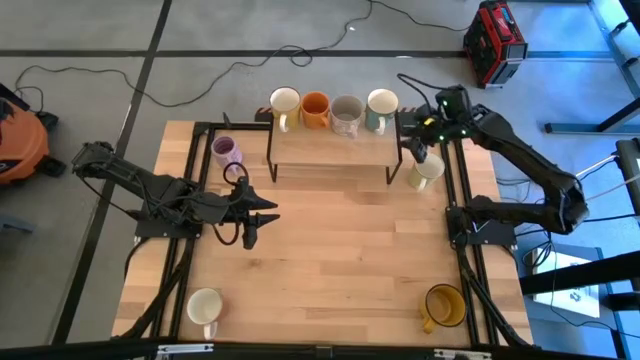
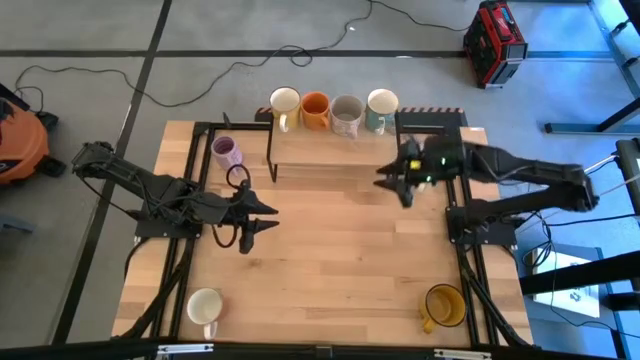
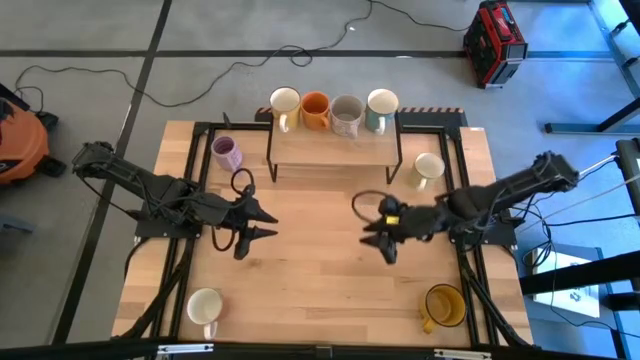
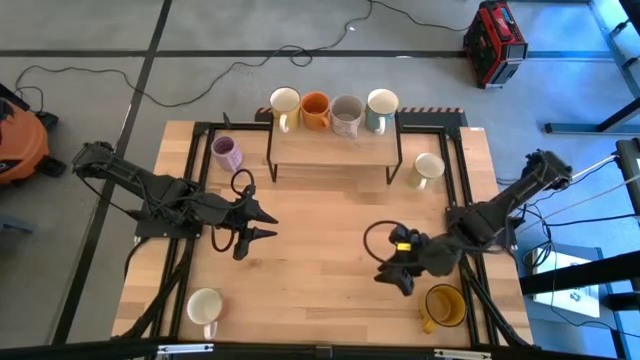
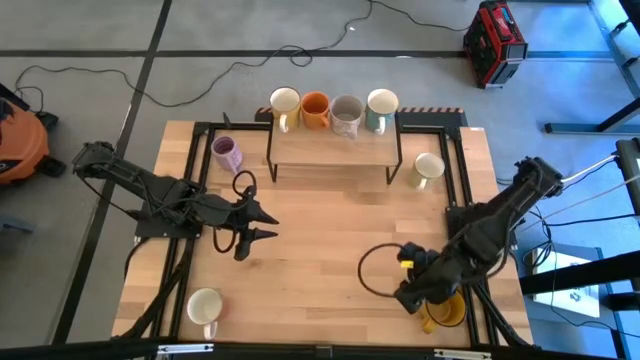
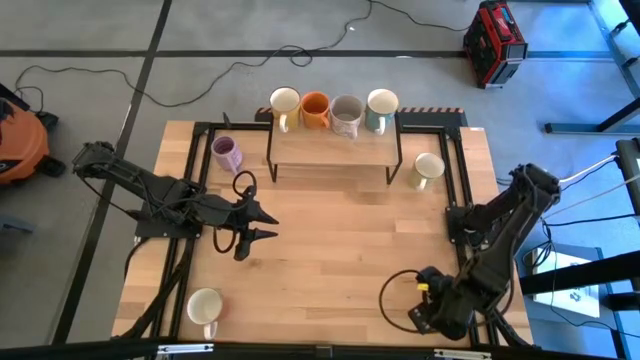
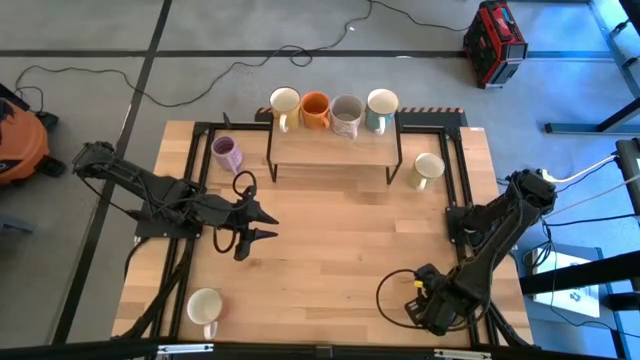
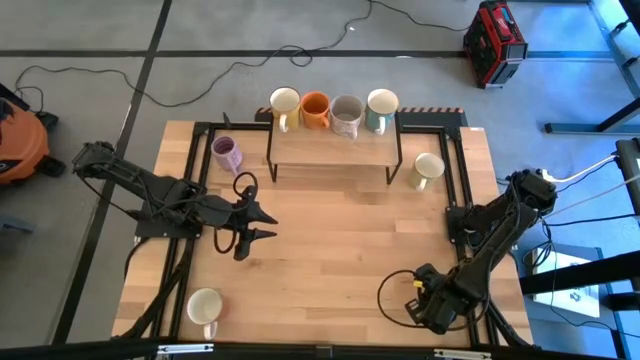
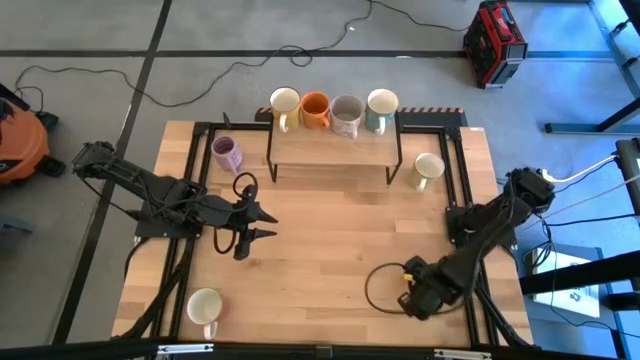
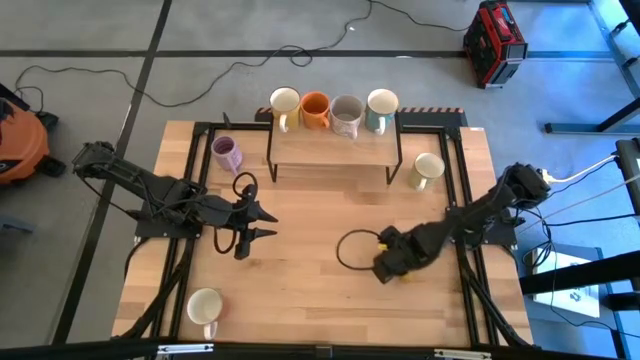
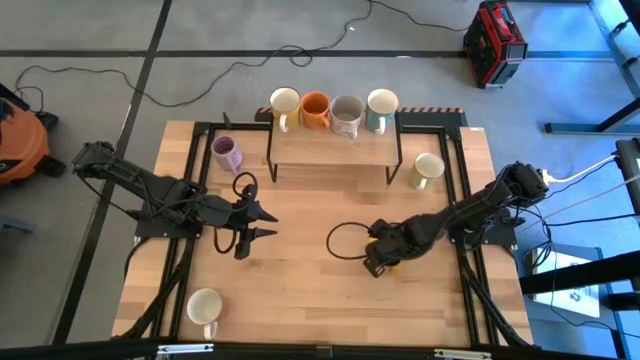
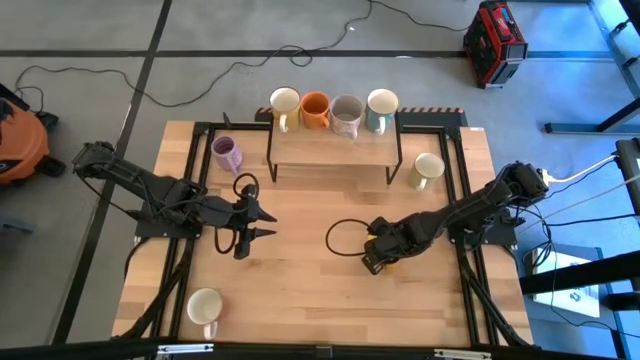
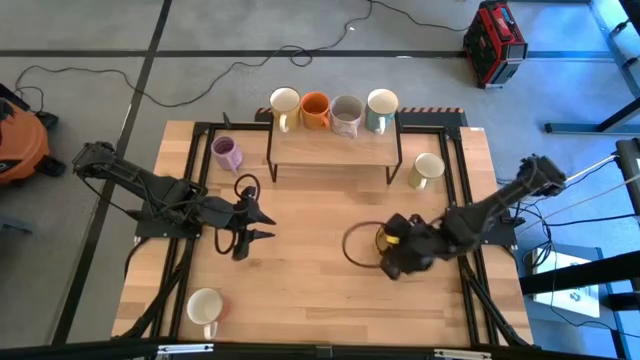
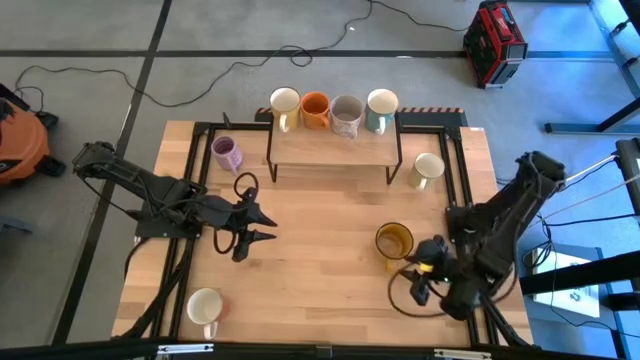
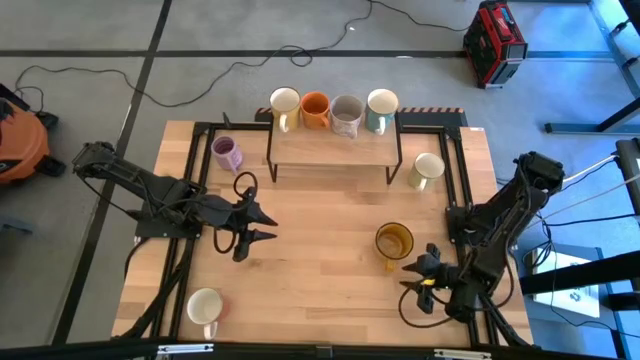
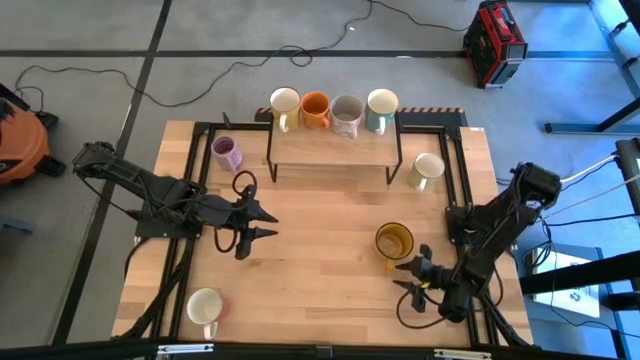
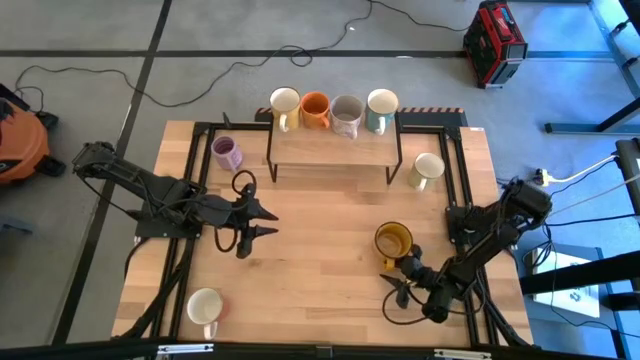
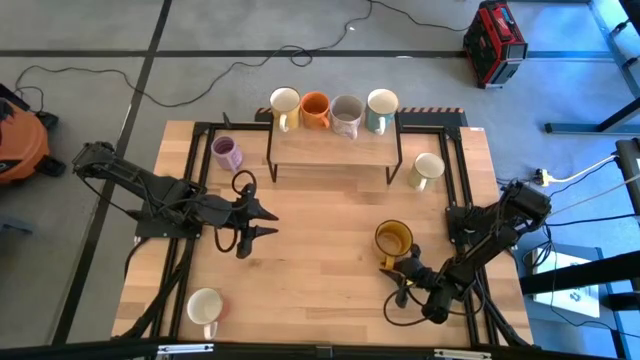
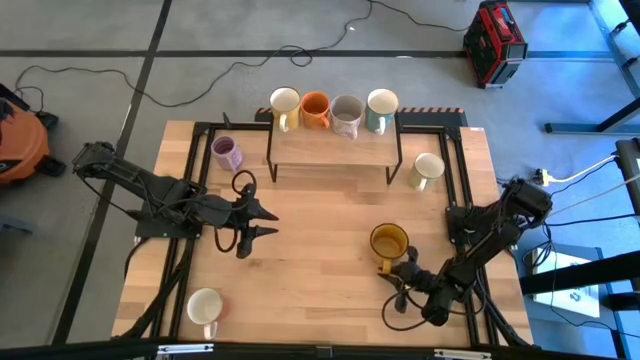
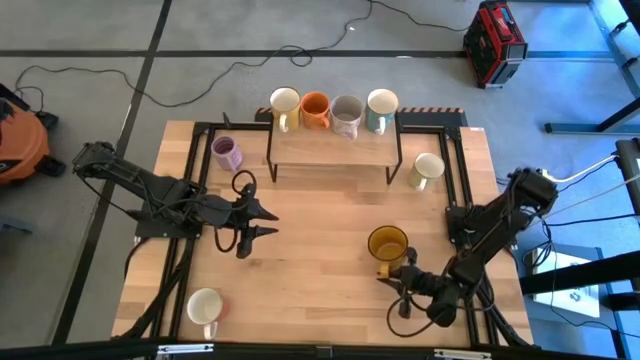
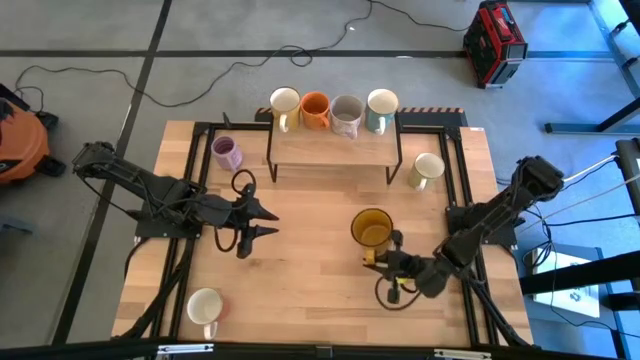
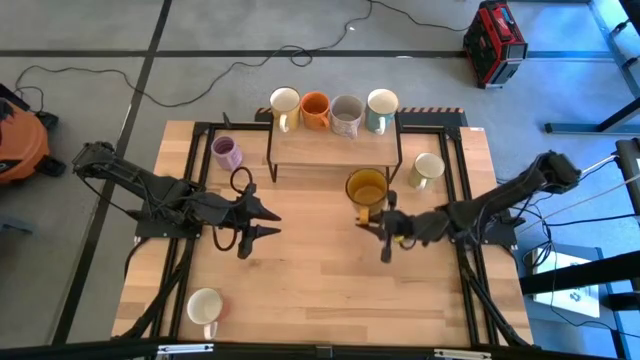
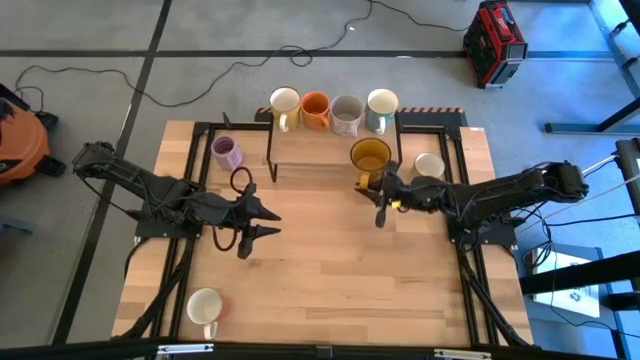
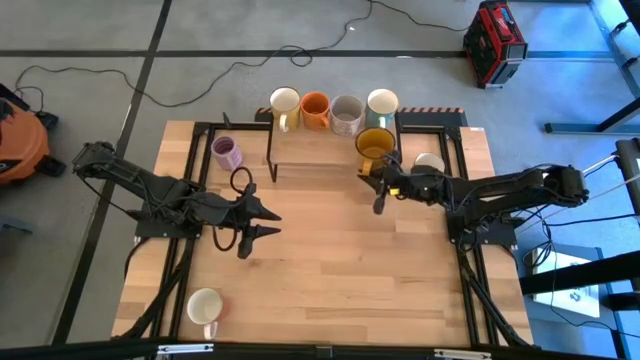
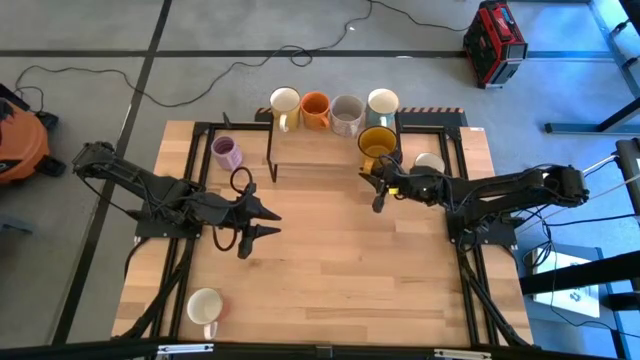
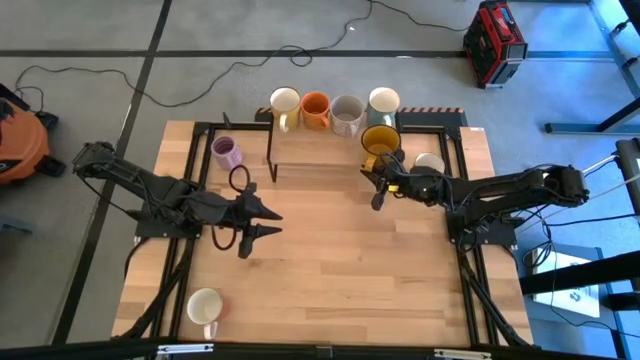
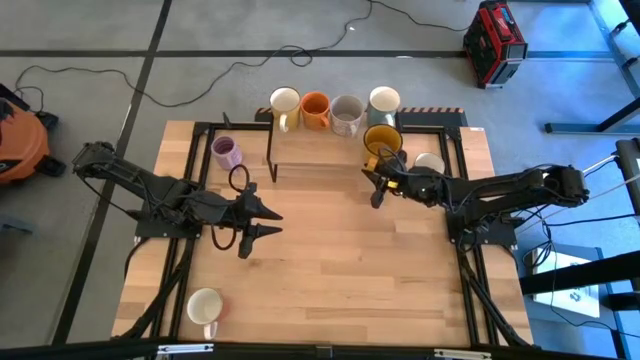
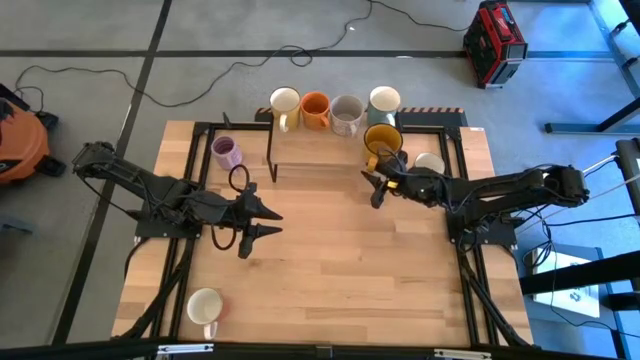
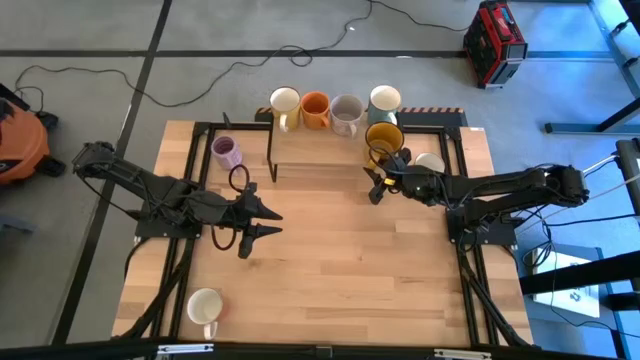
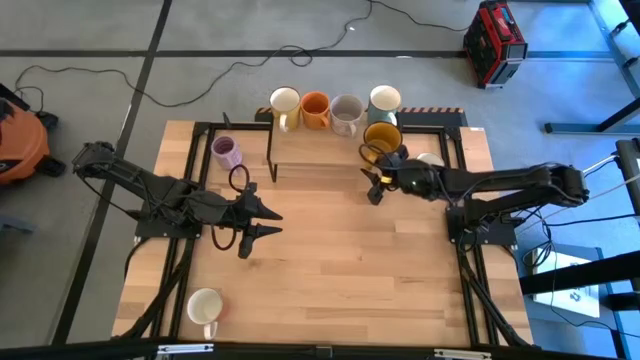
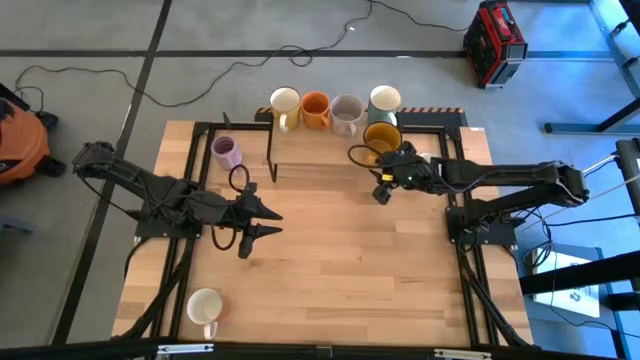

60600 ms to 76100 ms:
Task: Place coffee mugs
Put the yellow mug on the shelf

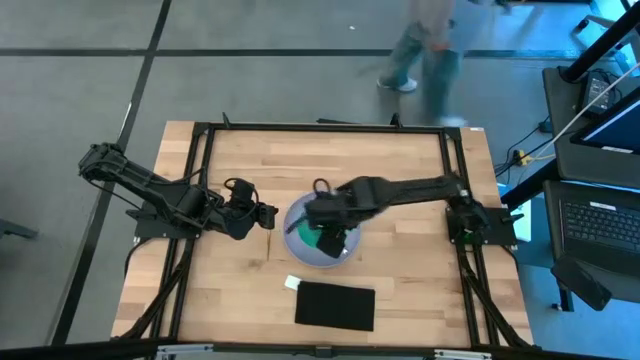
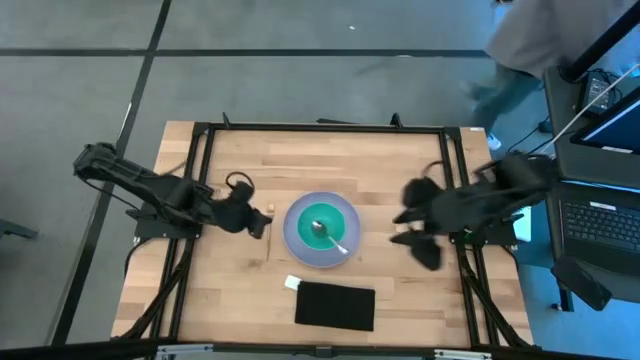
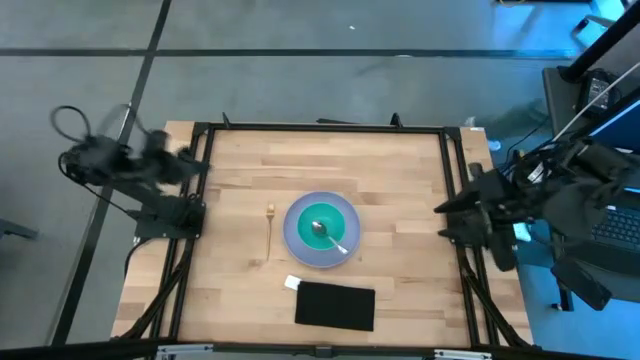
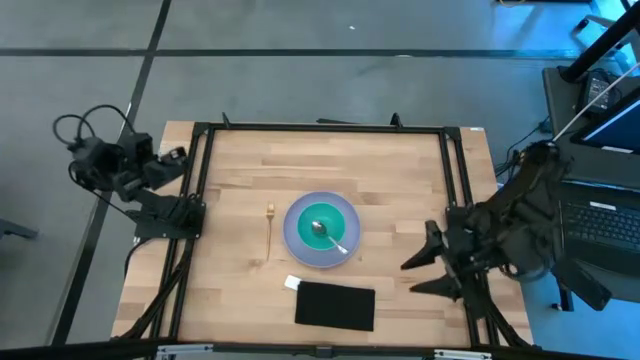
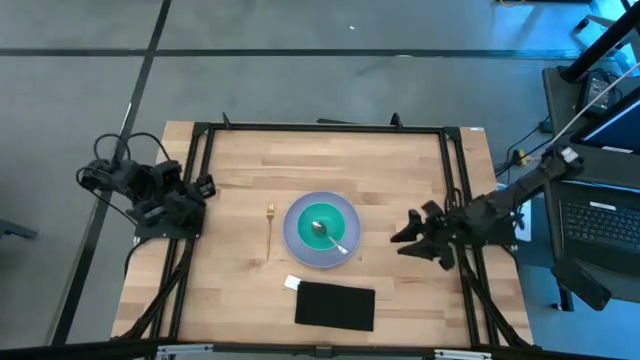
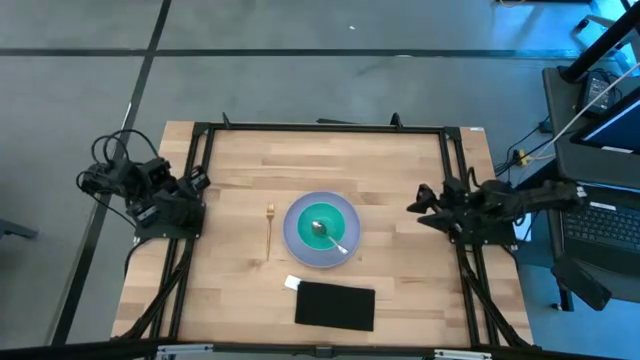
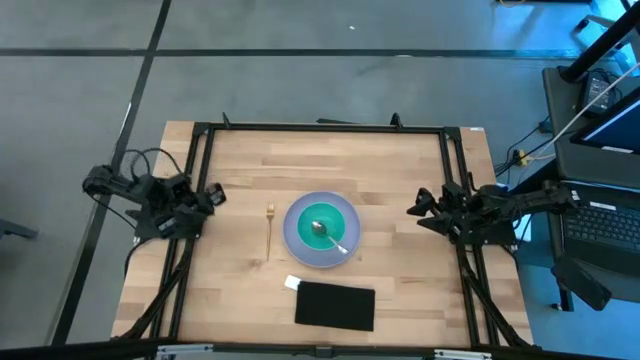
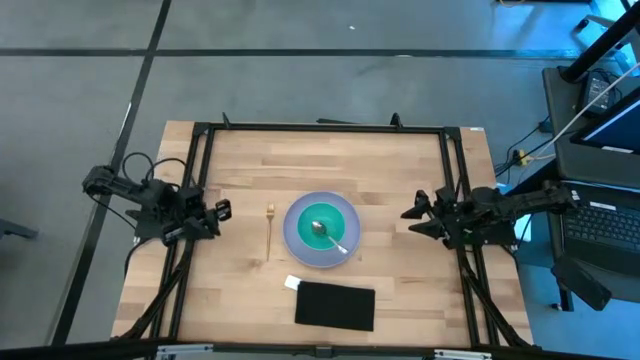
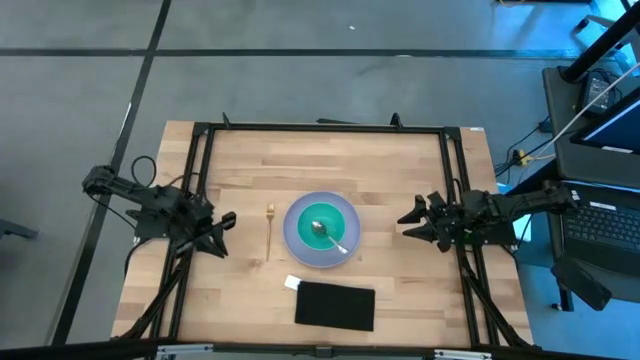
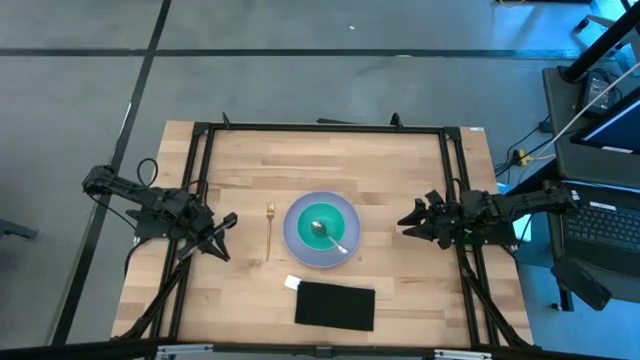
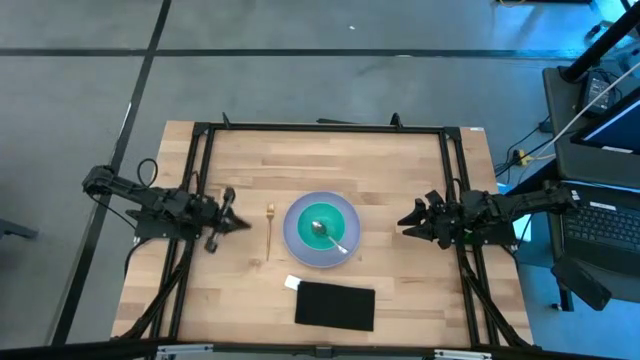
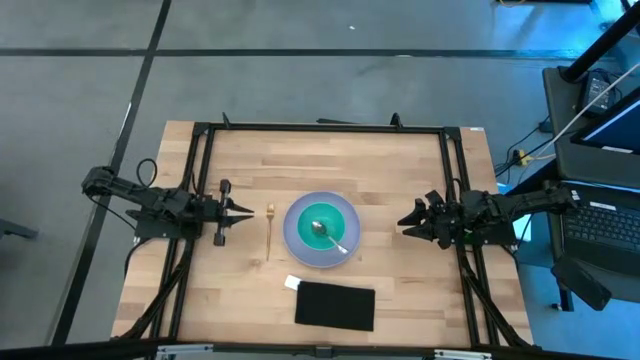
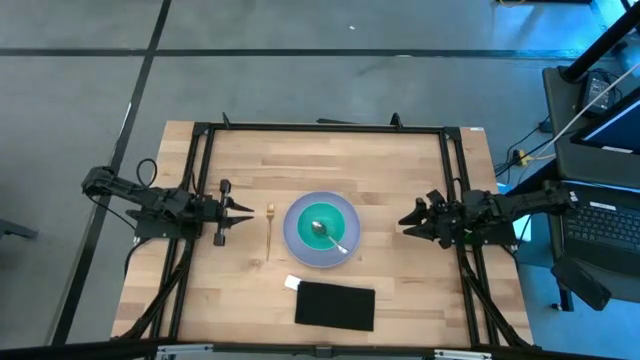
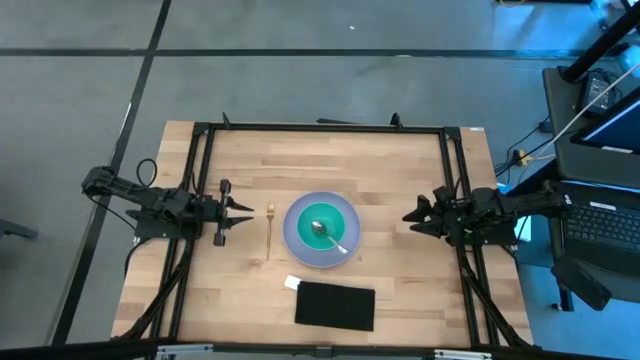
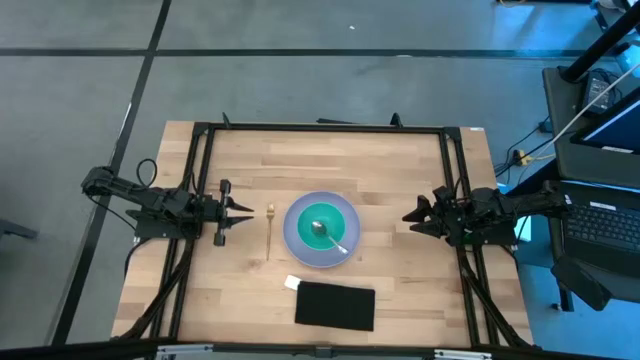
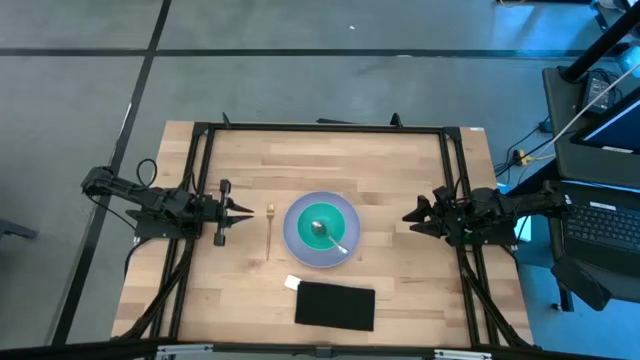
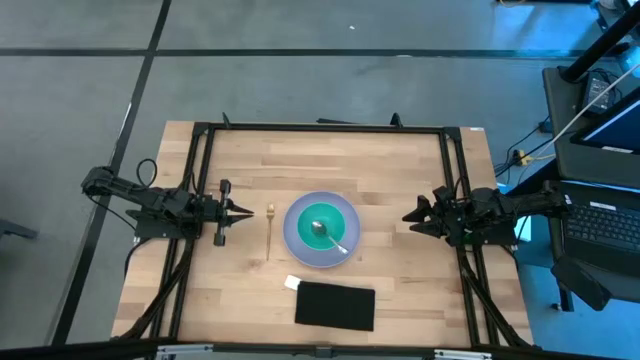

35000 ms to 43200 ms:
Task: Set table place
Return to Home Position
